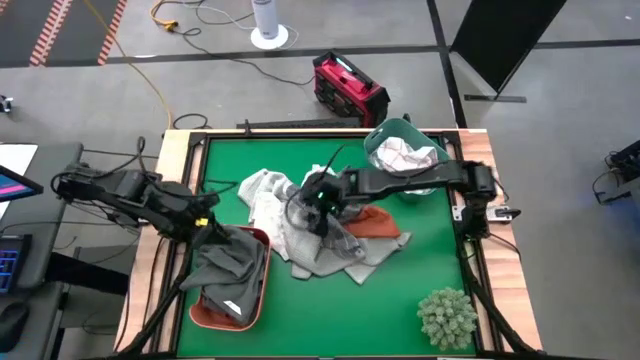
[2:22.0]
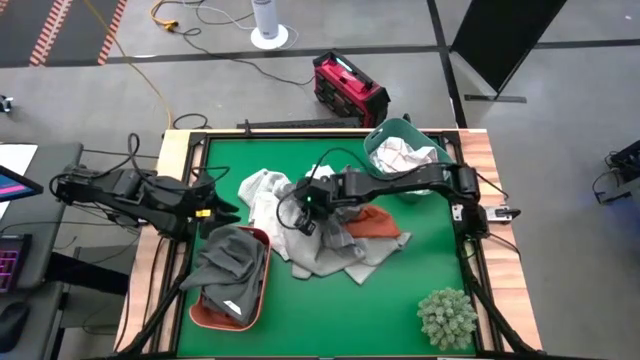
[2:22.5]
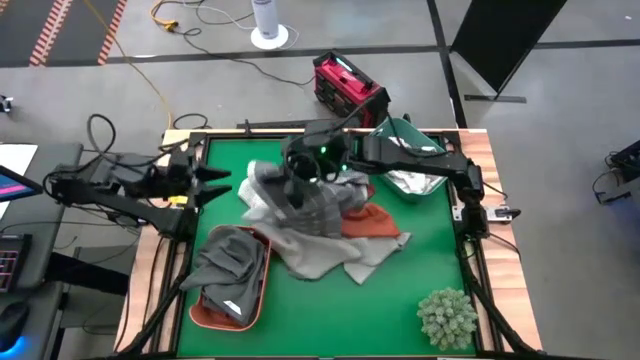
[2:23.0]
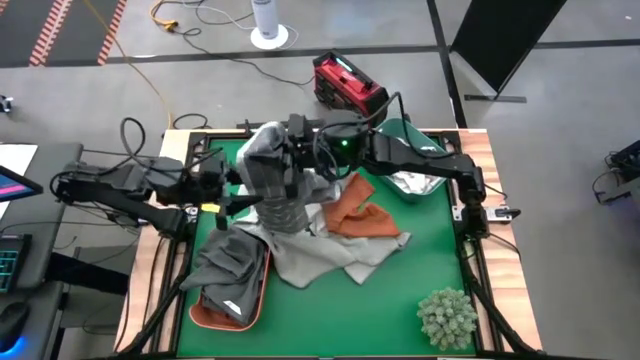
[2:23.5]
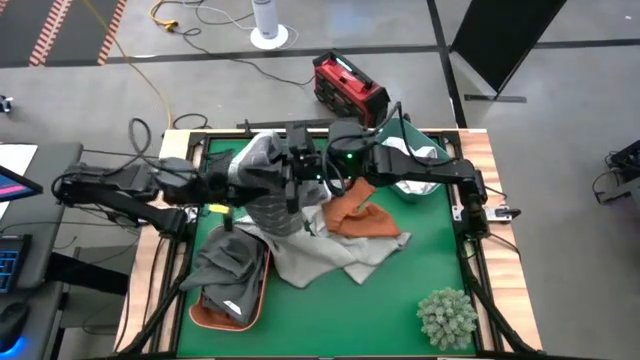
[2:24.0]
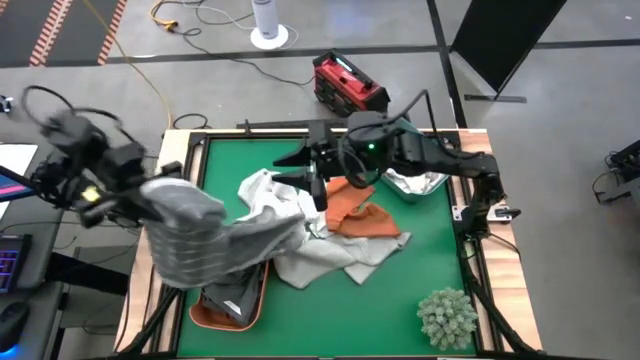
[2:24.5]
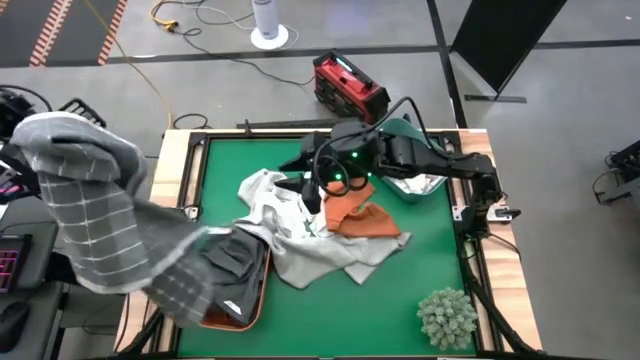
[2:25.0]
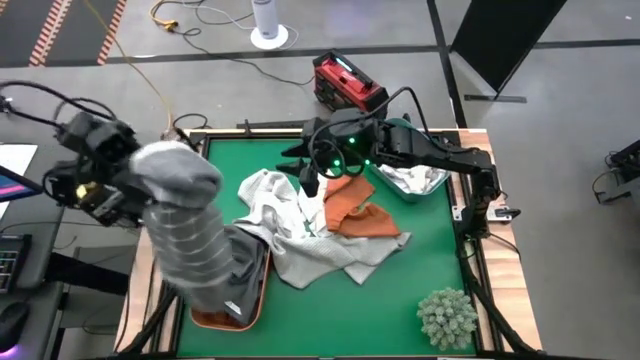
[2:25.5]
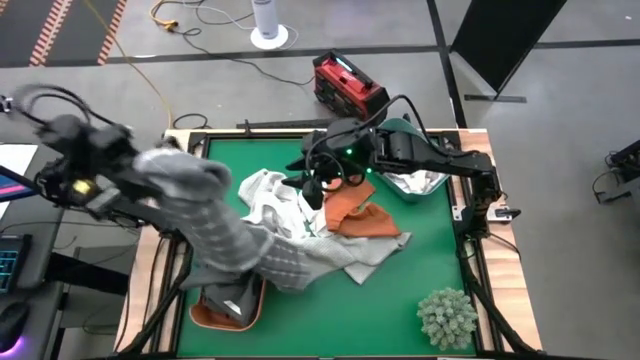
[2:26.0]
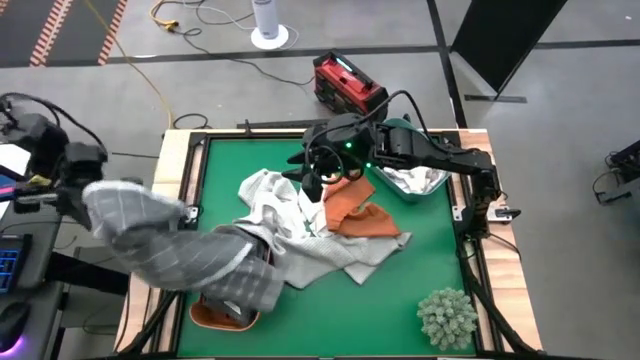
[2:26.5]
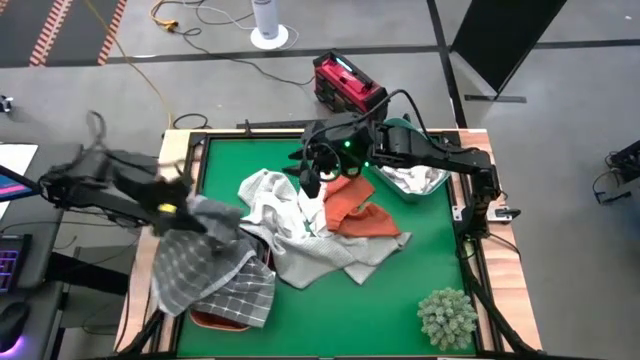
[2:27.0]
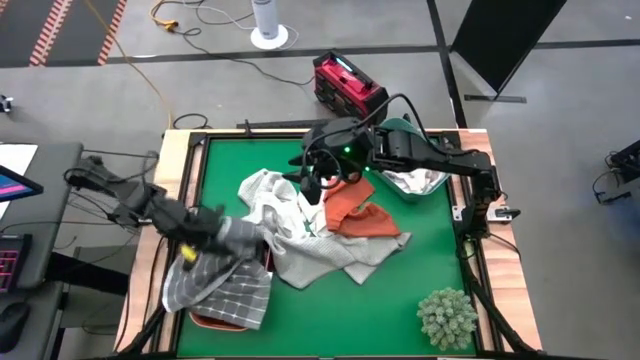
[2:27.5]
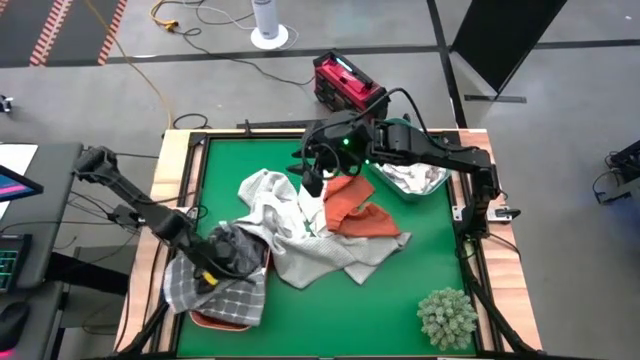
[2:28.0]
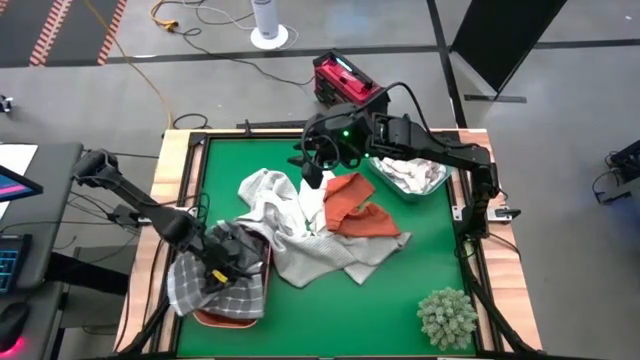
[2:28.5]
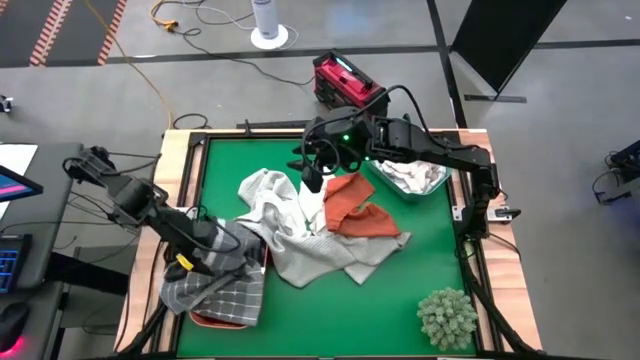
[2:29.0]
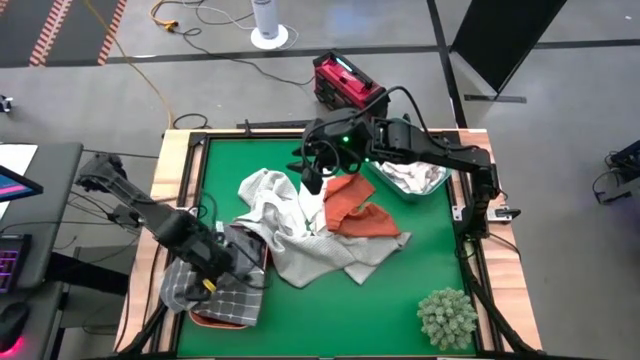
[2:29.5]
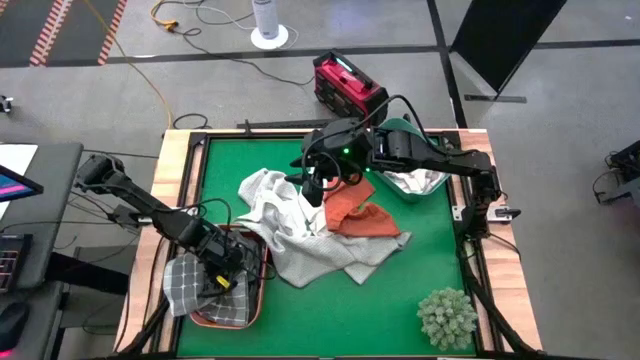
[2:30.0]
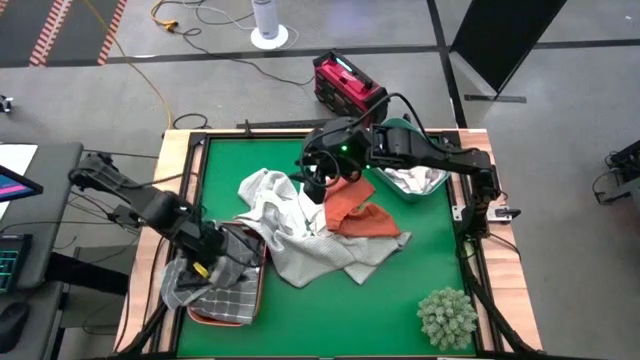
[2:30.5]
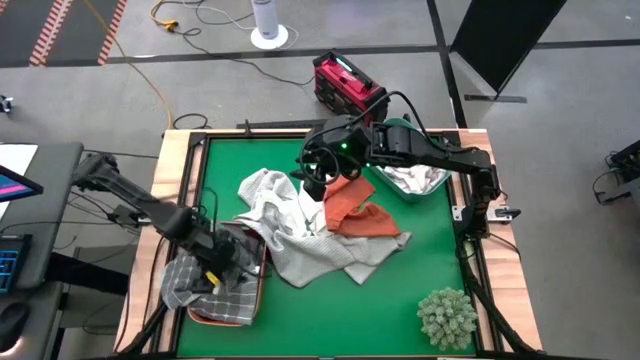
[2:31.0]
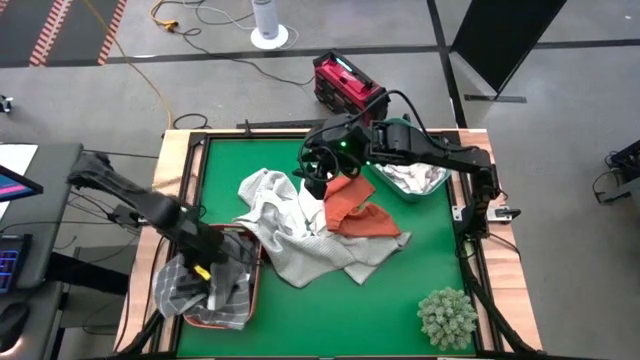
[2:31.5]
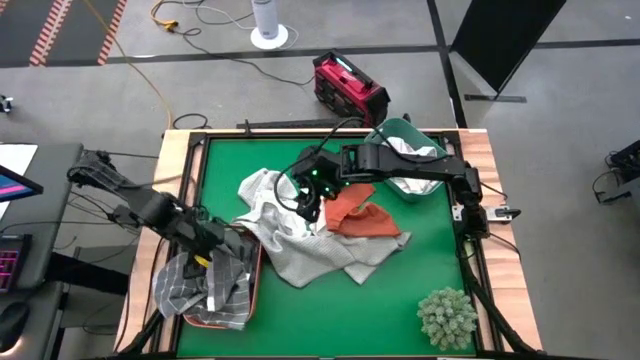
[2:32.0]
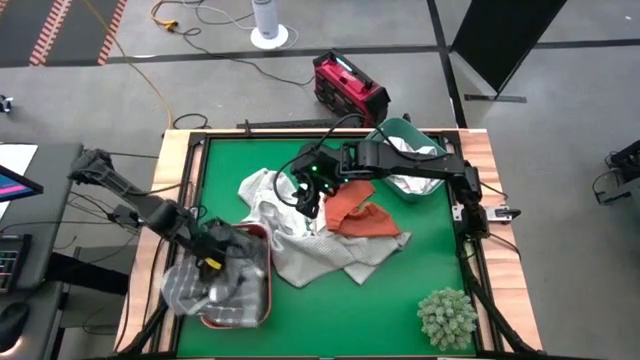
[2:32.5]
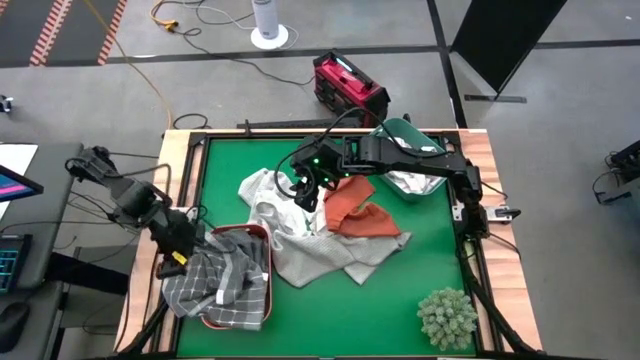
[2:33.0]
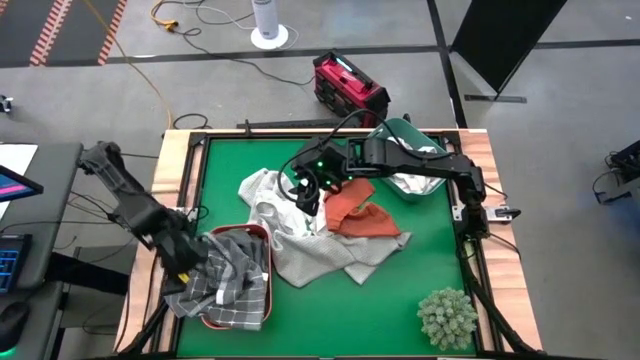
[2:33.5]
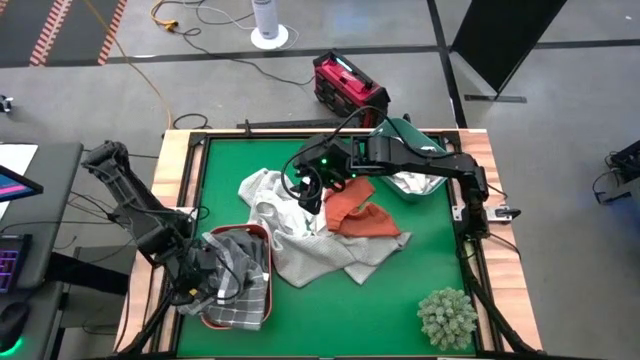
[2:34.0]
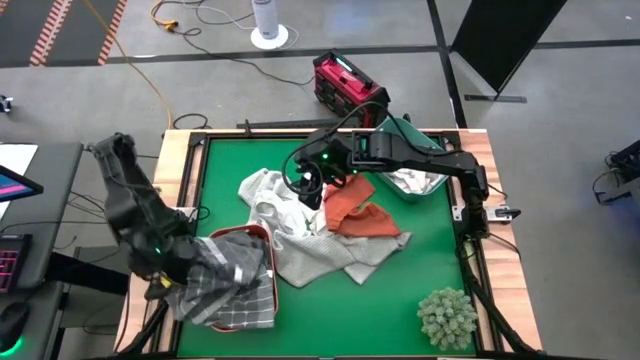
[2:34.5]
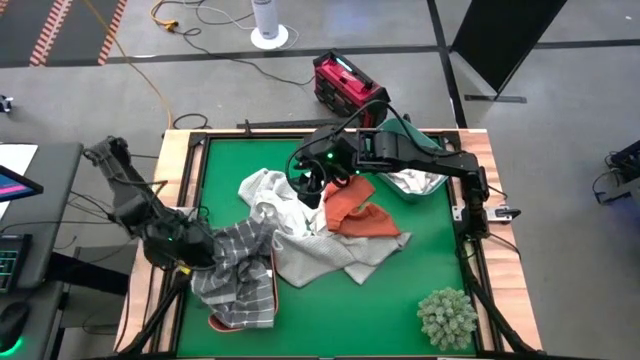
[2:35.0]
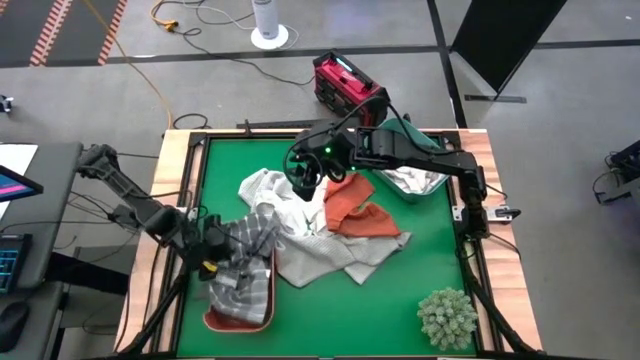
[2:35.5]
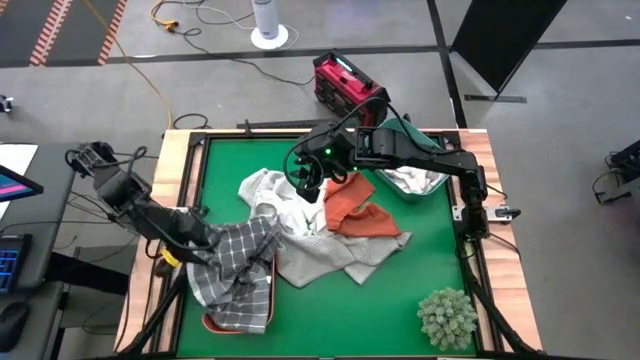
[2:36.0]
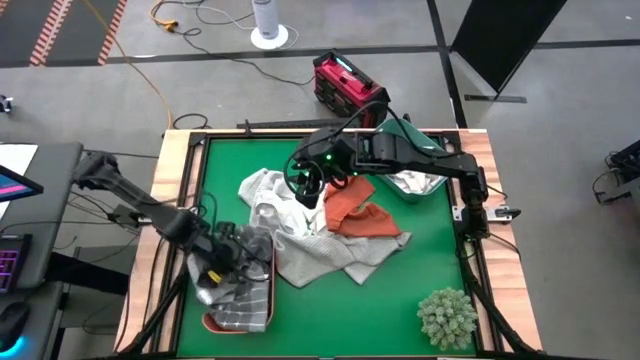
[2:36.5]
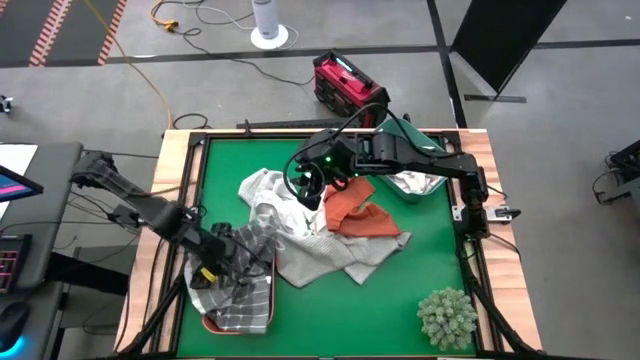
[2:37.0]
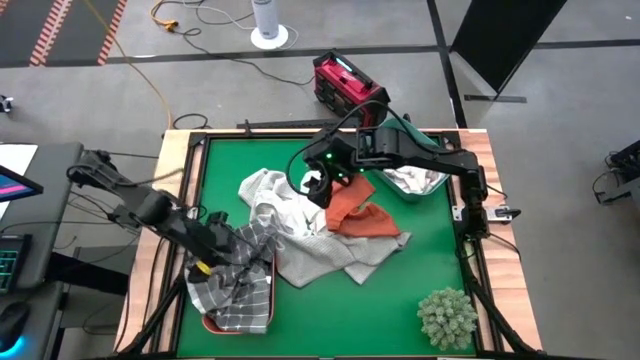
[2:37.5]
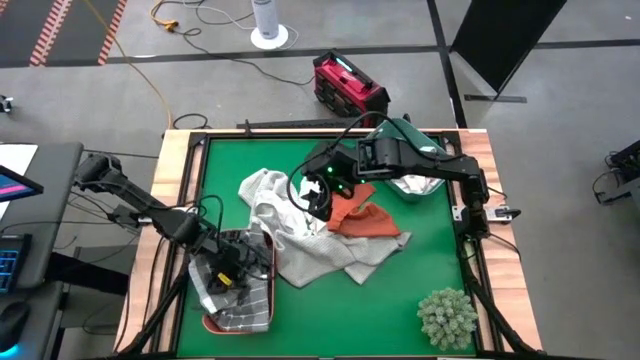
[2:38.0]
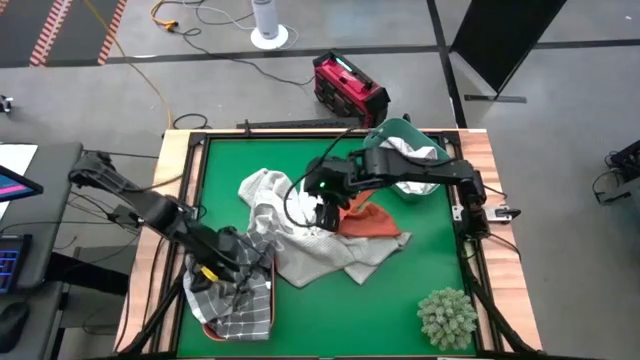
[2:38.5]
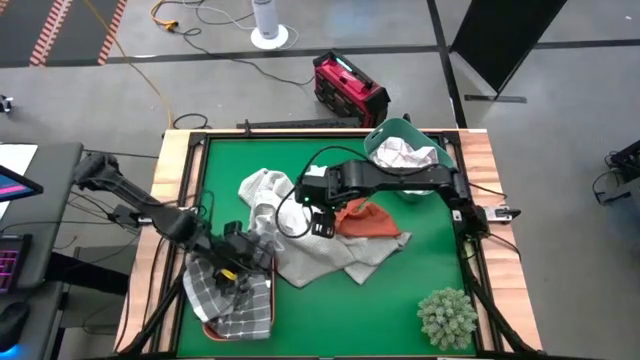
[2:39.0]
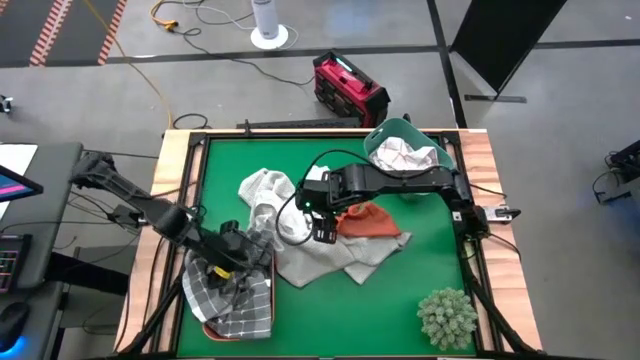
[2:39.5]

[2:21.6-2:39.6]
Task: Sort towels by color in basket
Put the gray patterned towel into the orange bin
